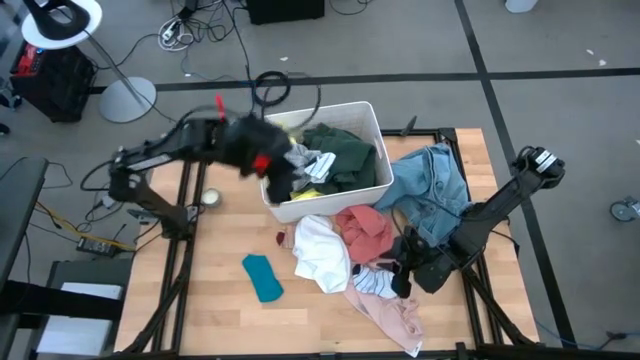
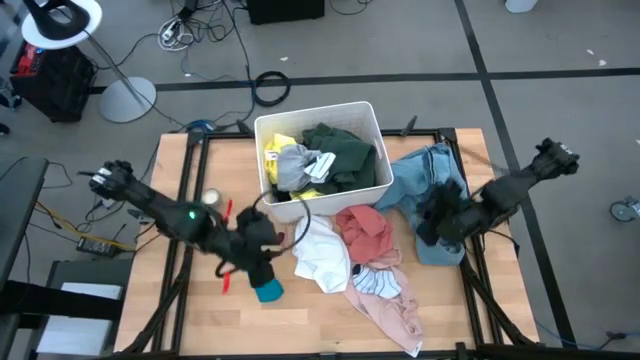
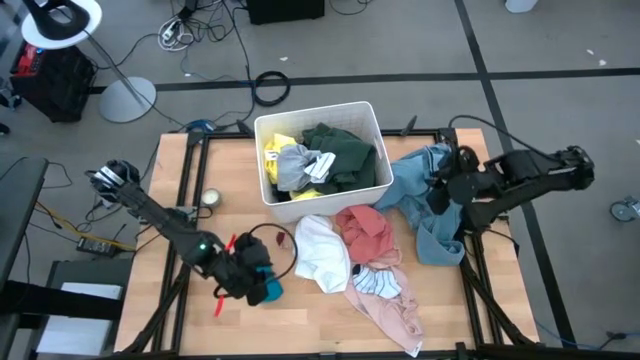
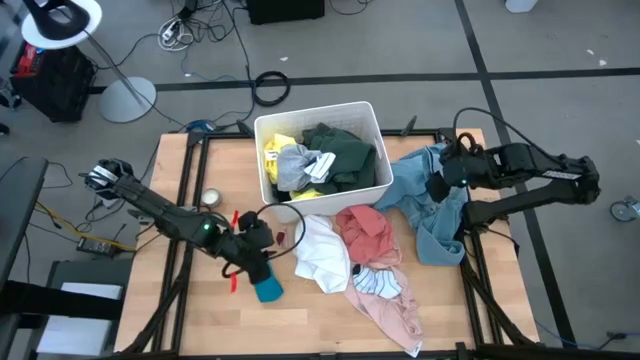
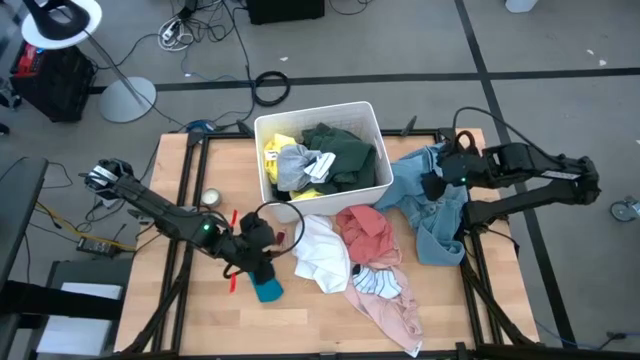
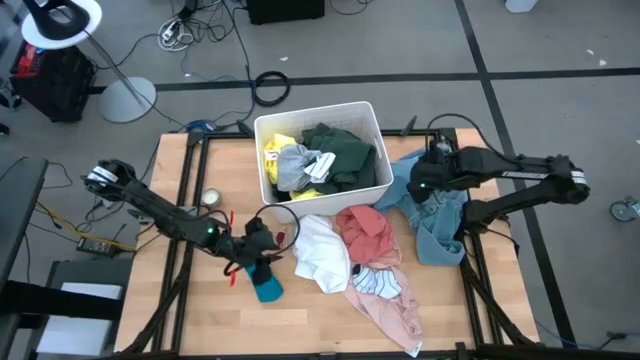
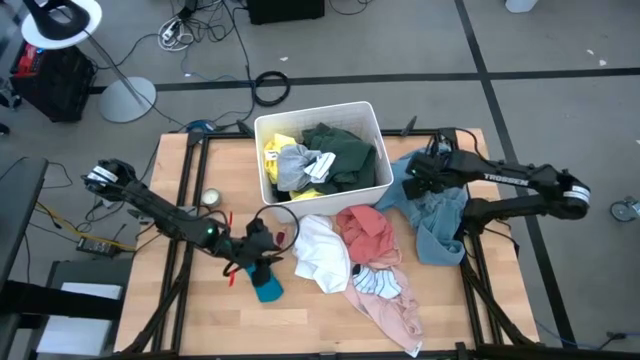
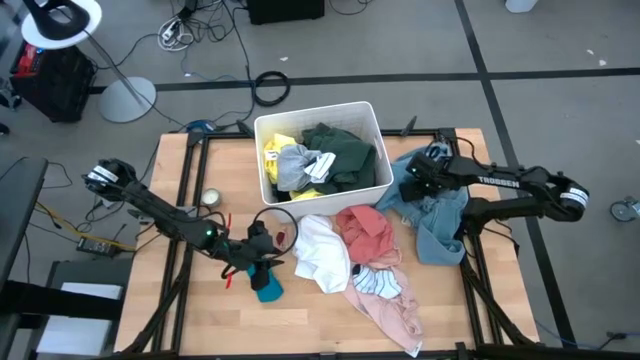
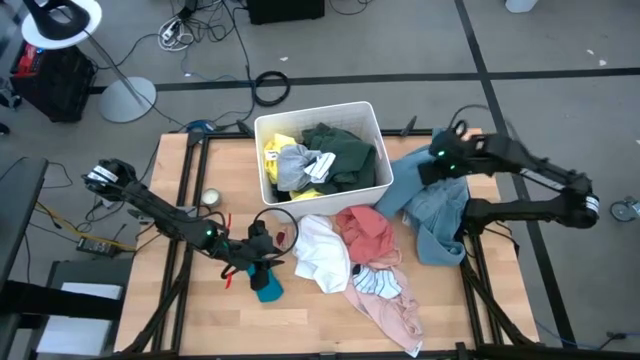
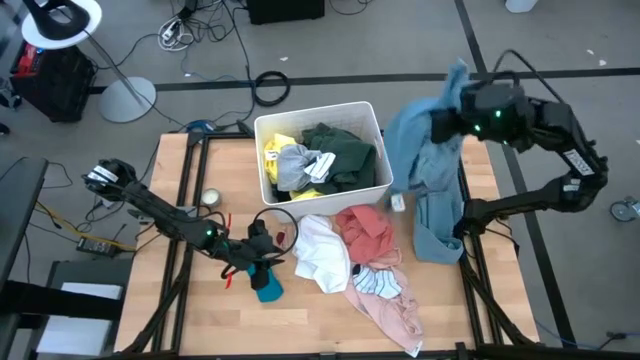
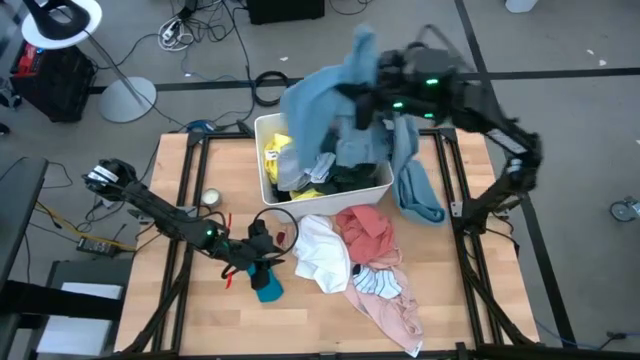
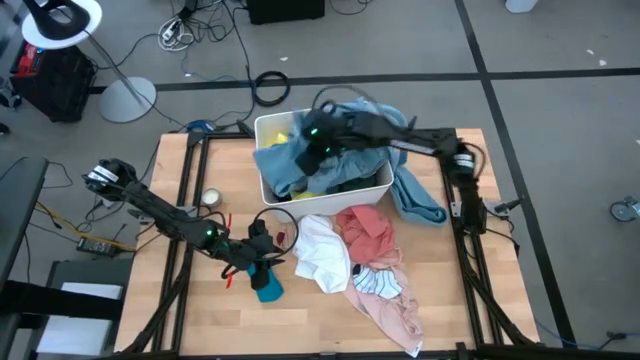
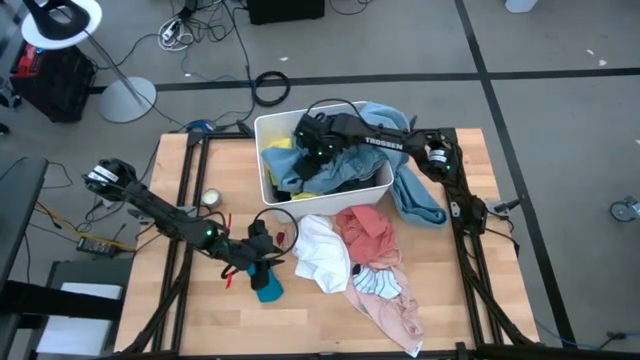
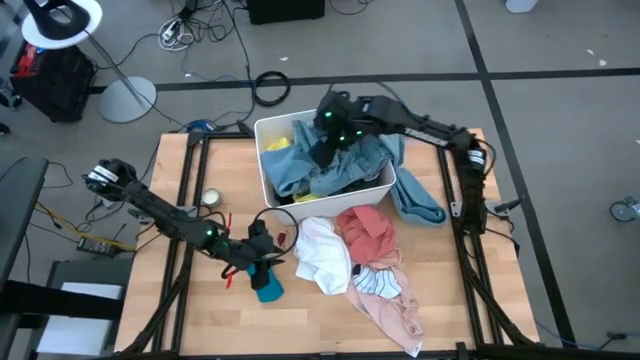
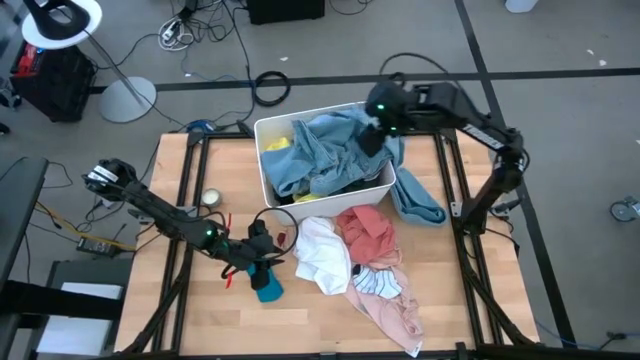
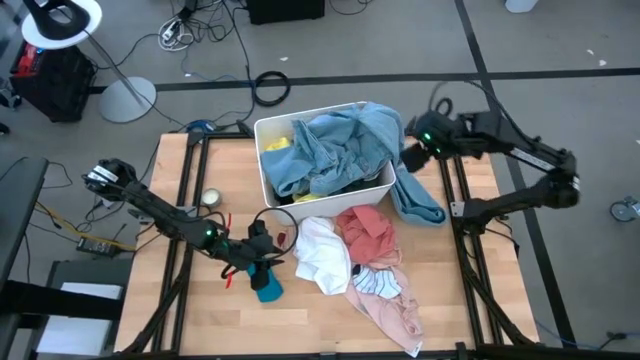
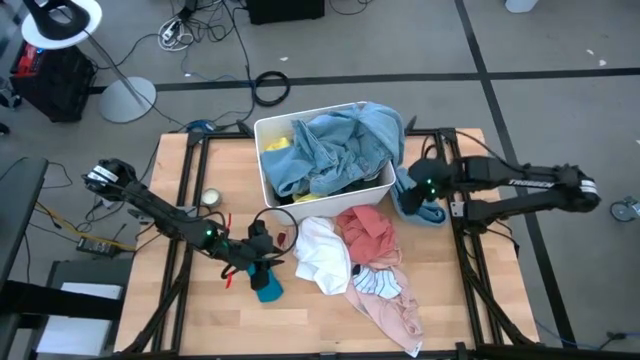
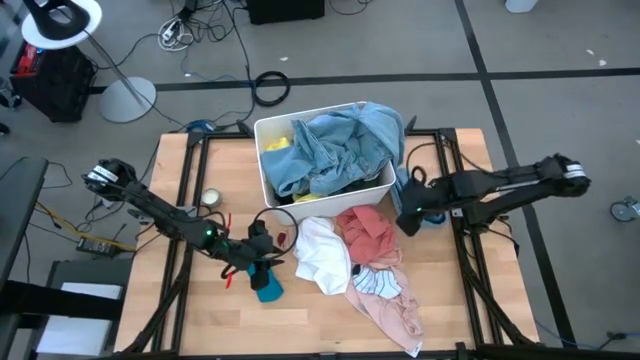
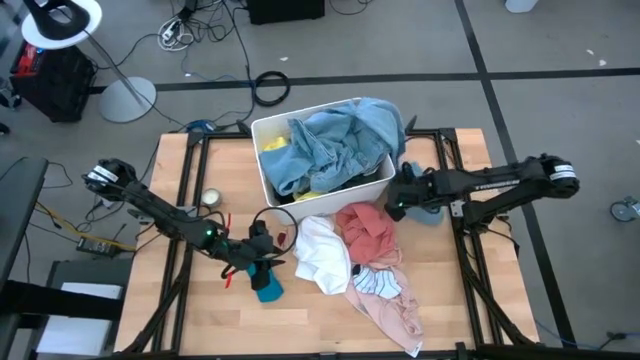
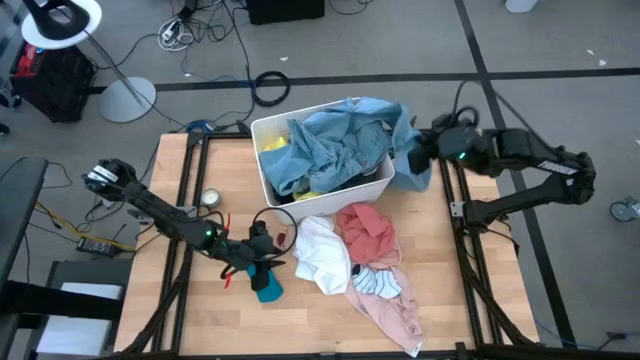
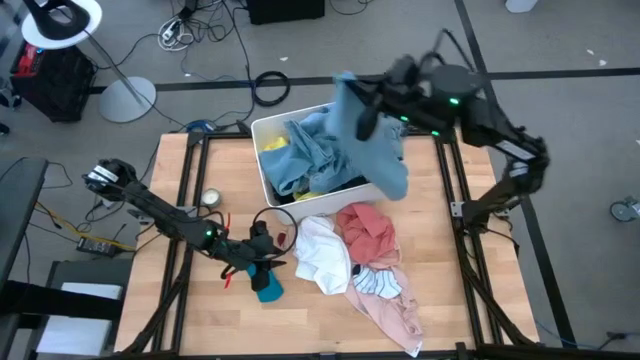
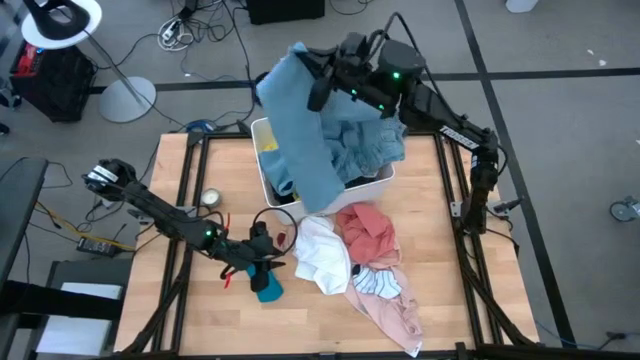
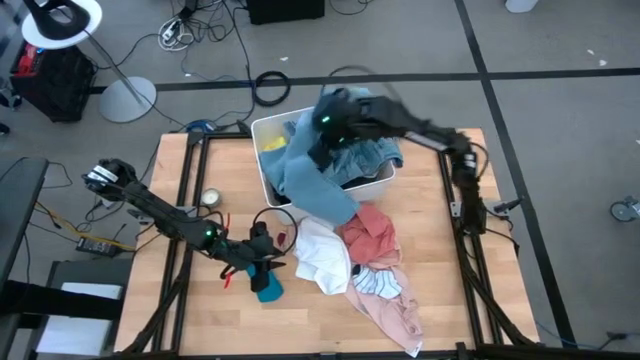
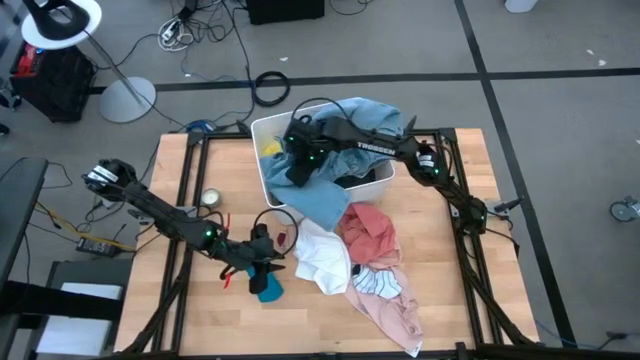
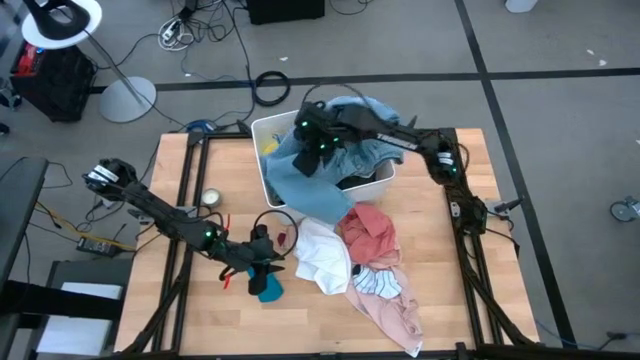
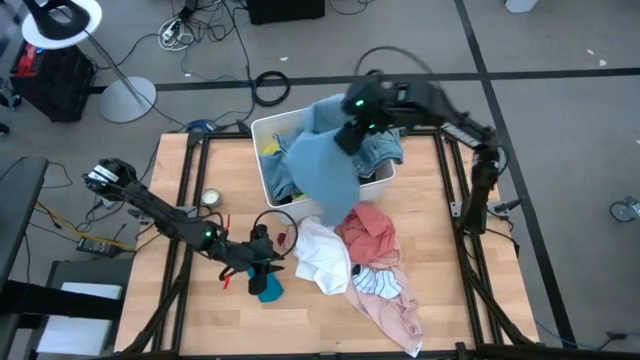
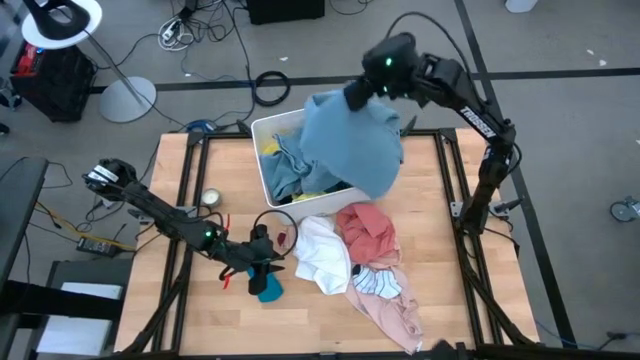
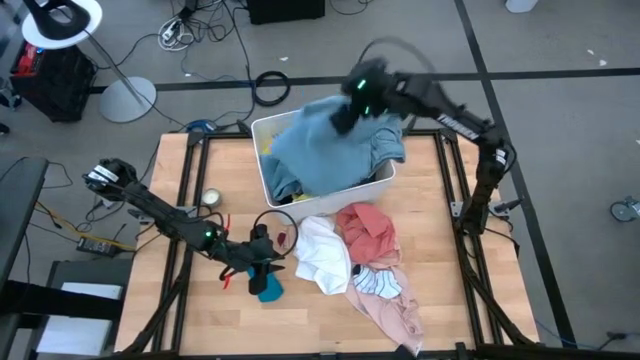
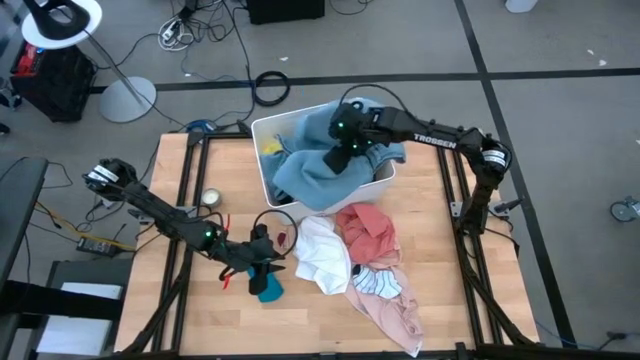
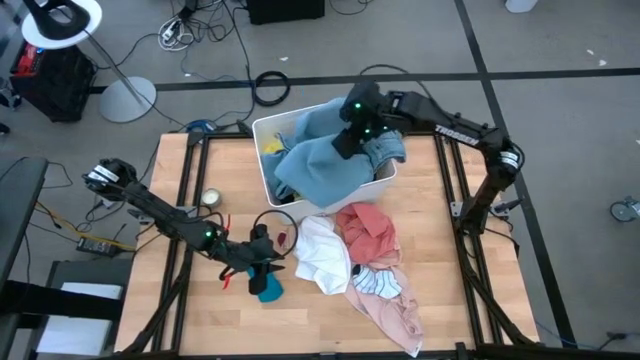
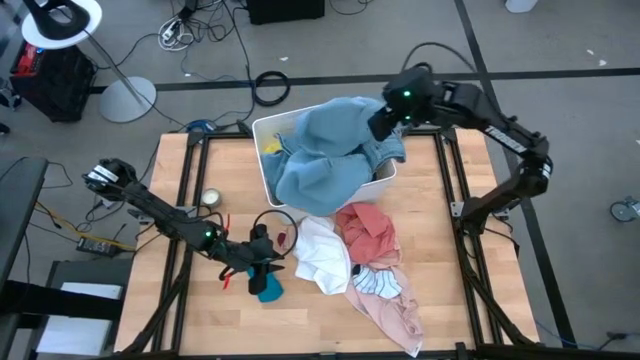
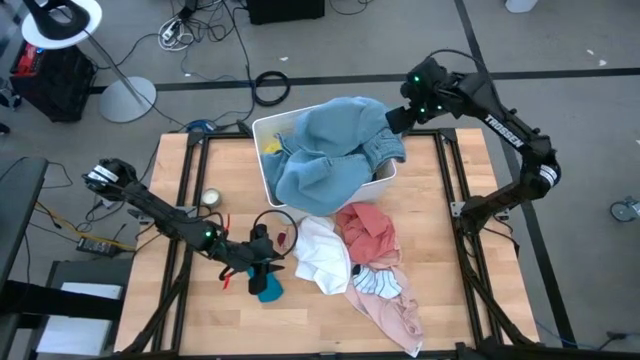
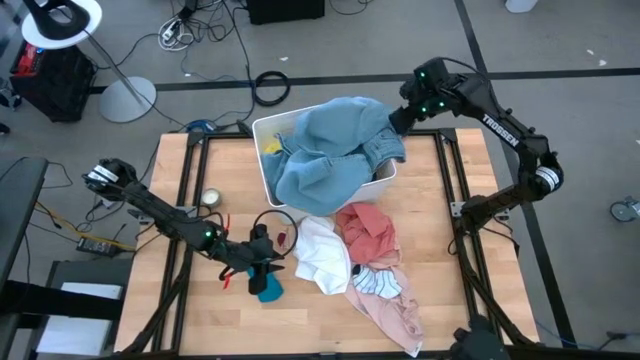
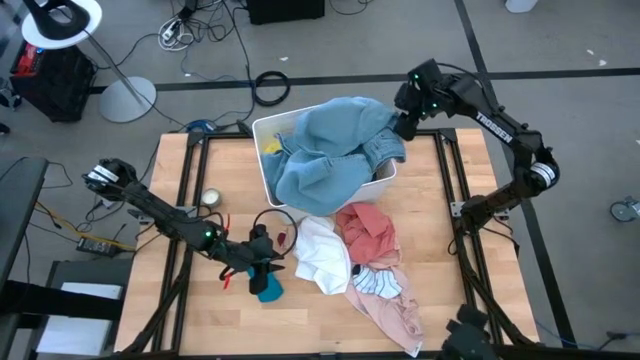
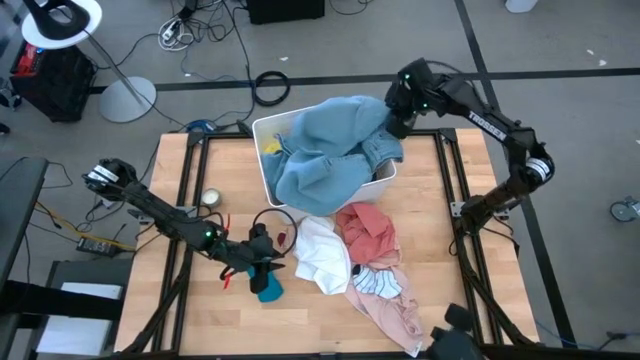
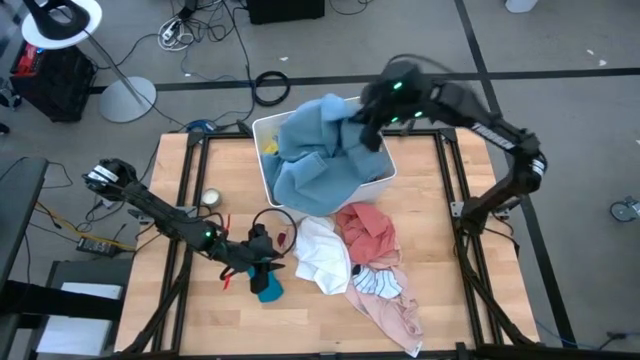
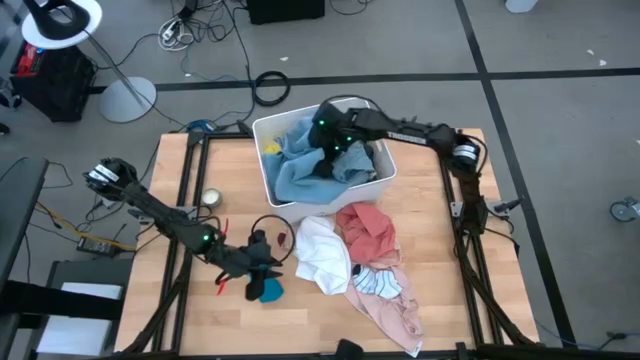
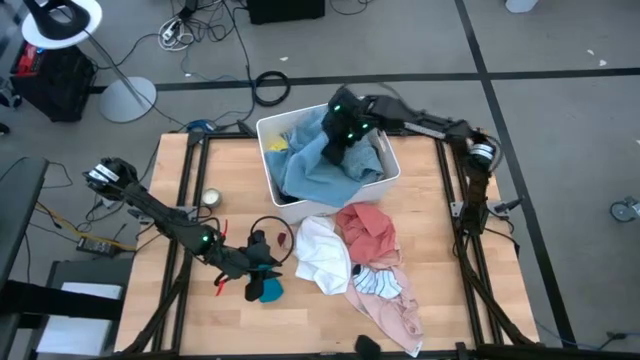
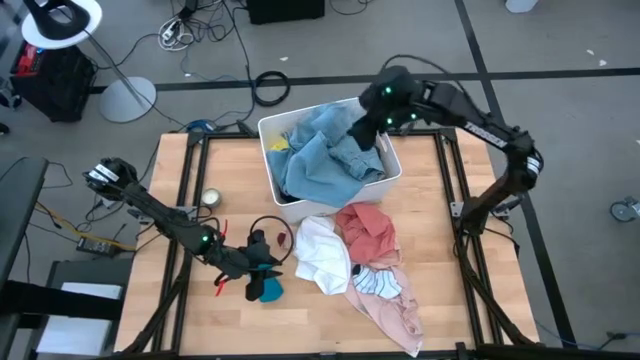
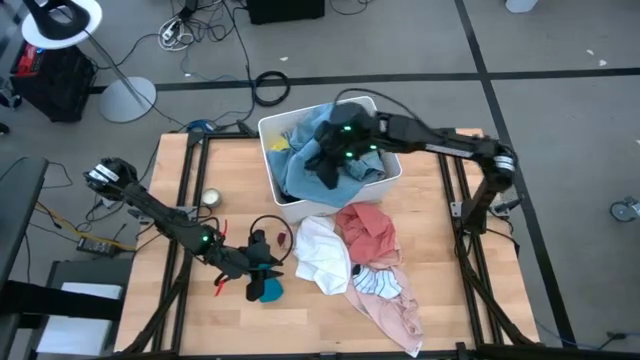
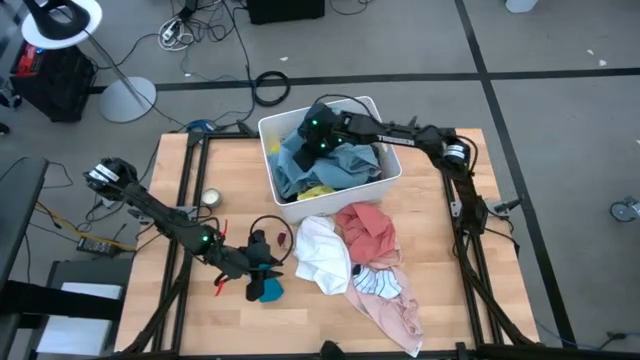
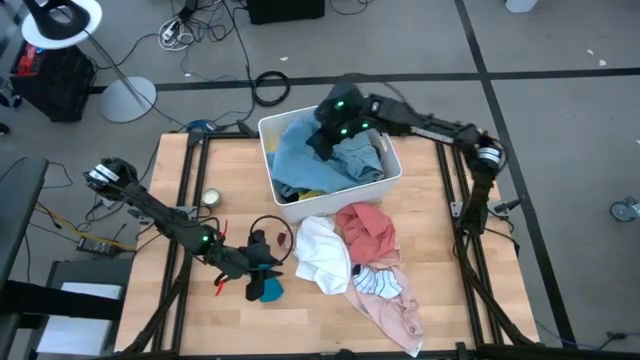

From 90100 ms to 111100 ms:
Task: Sort clothes
Put the light blue pants into the white bin
